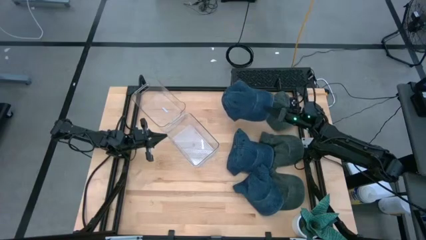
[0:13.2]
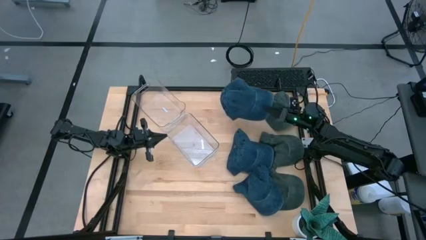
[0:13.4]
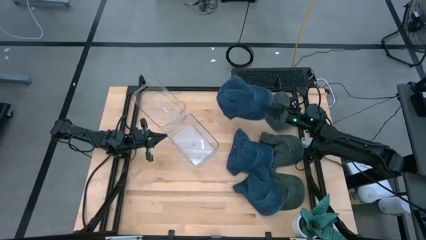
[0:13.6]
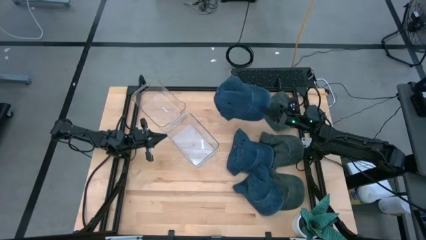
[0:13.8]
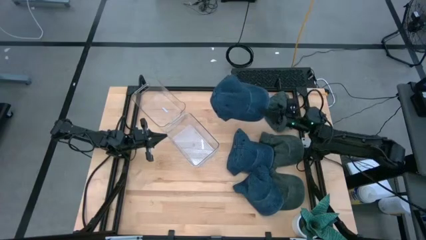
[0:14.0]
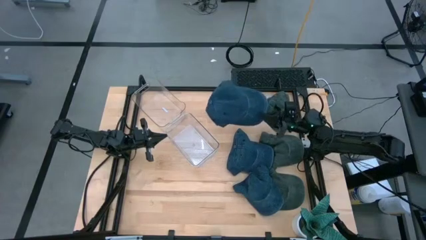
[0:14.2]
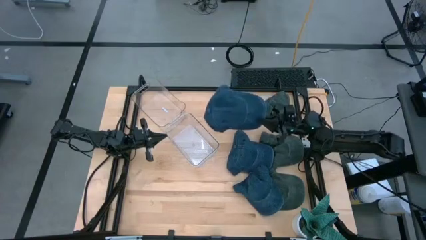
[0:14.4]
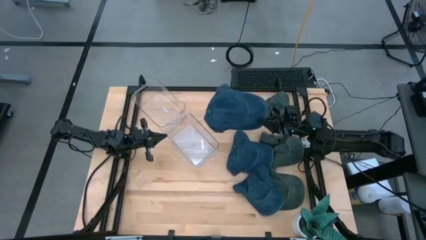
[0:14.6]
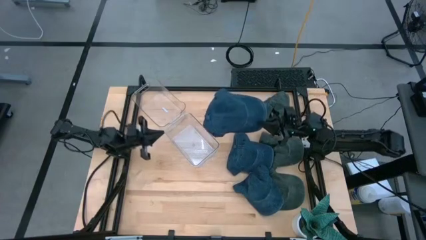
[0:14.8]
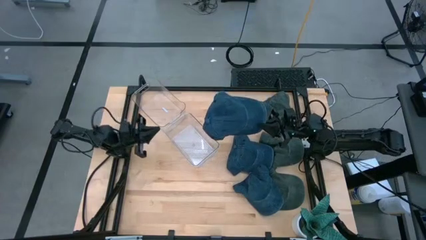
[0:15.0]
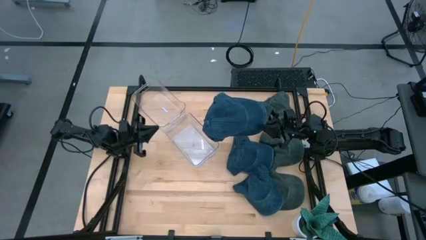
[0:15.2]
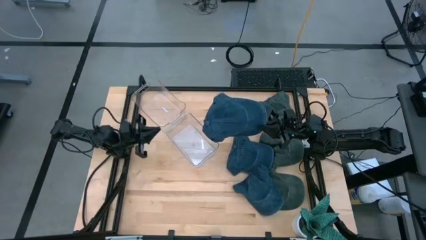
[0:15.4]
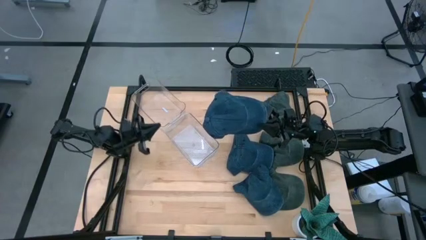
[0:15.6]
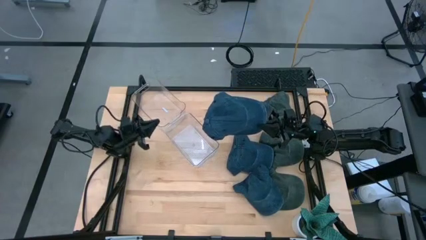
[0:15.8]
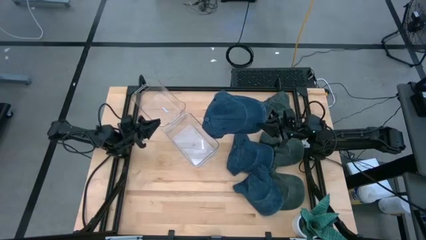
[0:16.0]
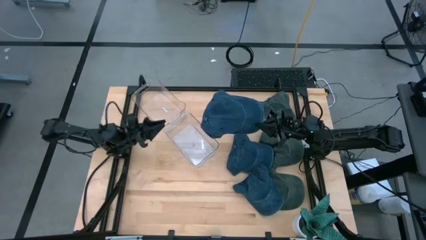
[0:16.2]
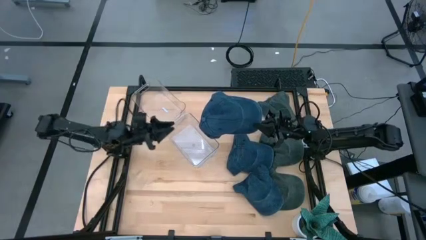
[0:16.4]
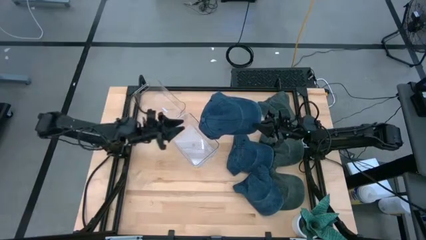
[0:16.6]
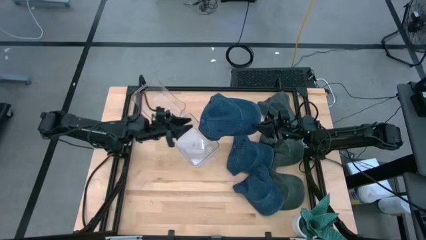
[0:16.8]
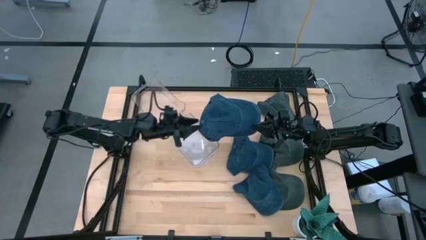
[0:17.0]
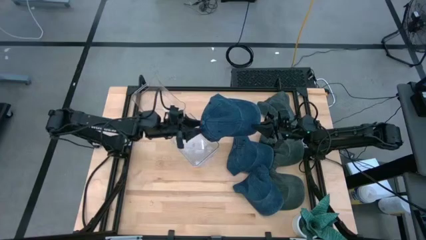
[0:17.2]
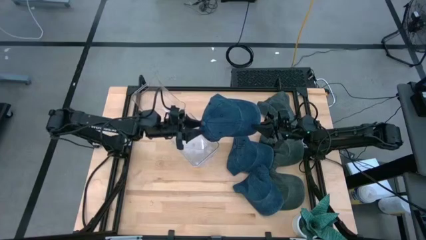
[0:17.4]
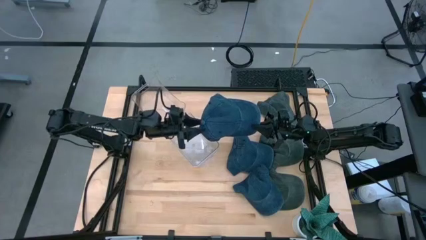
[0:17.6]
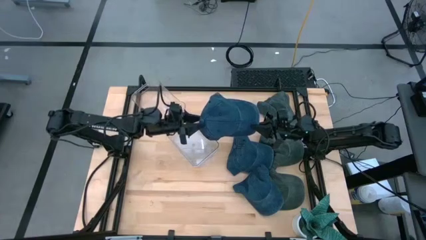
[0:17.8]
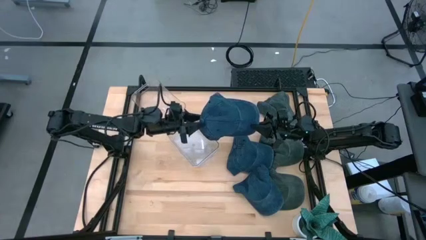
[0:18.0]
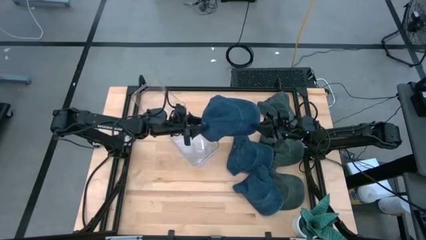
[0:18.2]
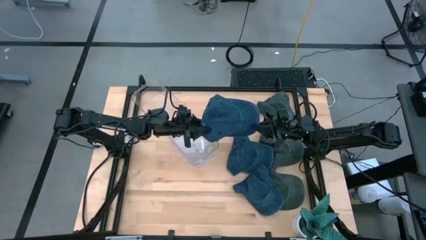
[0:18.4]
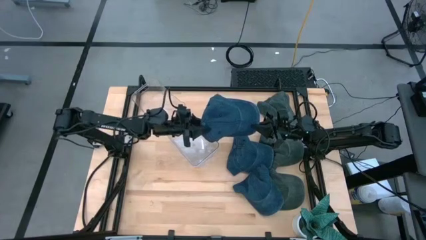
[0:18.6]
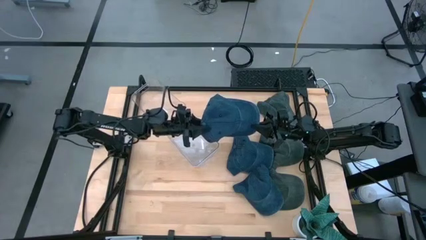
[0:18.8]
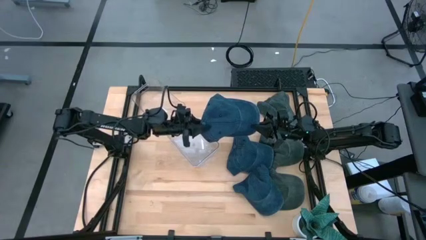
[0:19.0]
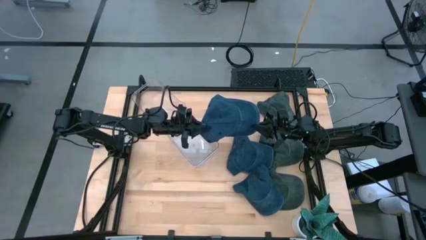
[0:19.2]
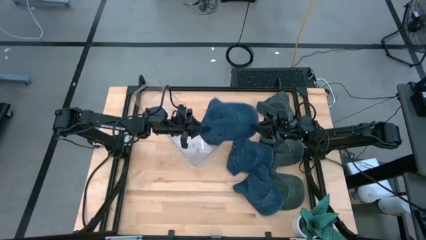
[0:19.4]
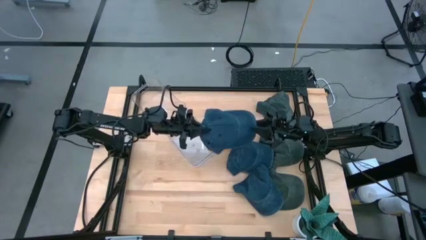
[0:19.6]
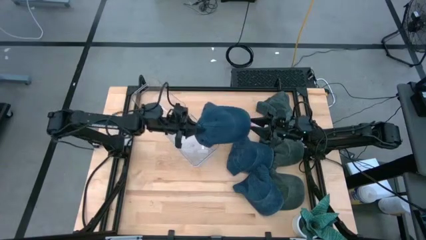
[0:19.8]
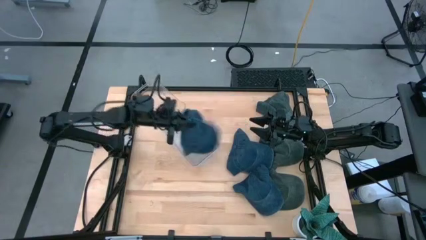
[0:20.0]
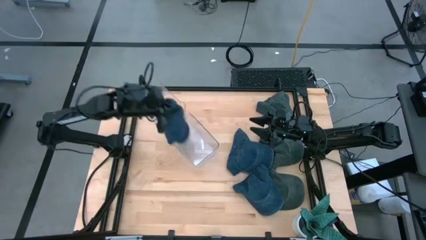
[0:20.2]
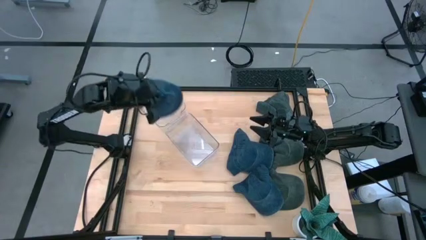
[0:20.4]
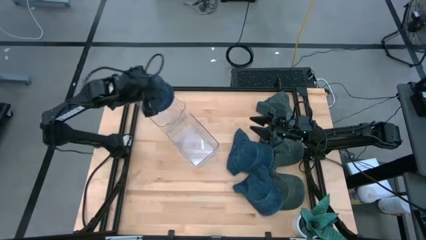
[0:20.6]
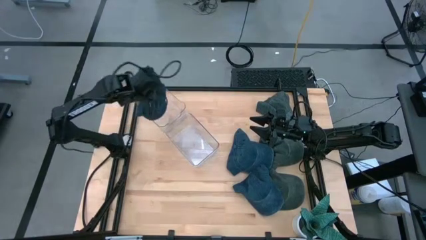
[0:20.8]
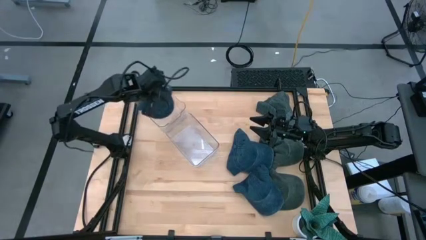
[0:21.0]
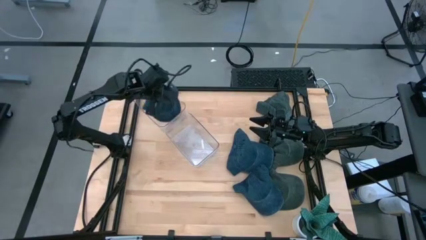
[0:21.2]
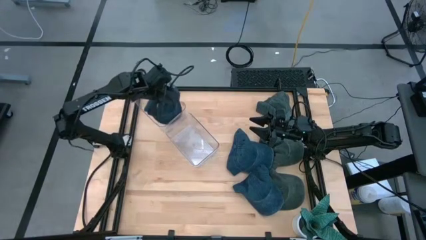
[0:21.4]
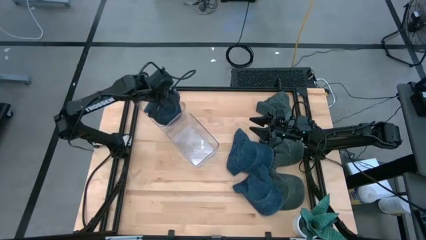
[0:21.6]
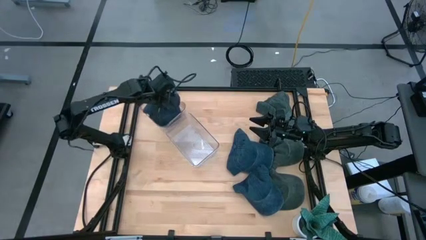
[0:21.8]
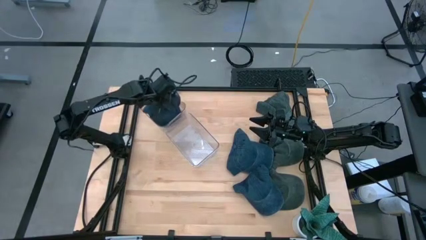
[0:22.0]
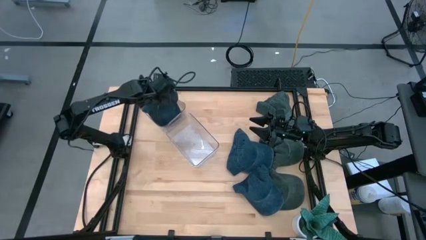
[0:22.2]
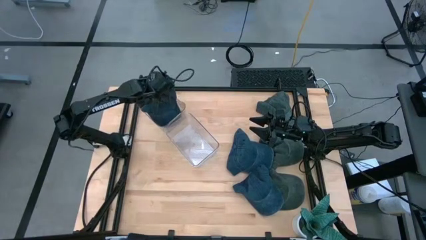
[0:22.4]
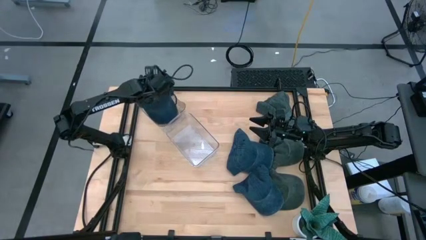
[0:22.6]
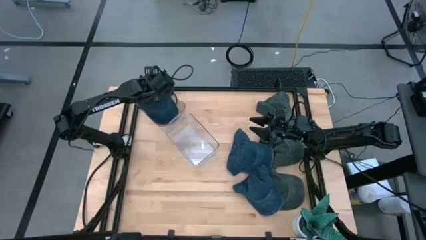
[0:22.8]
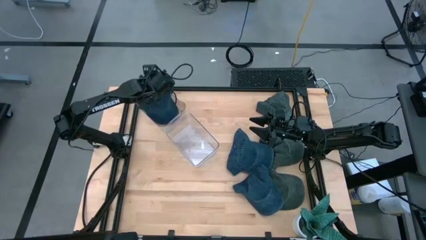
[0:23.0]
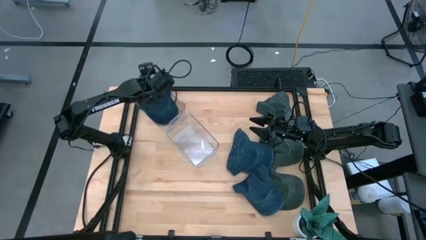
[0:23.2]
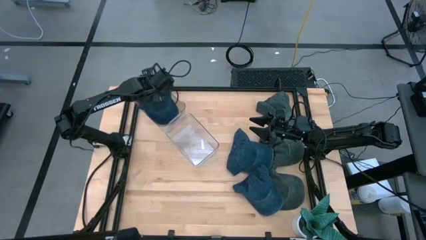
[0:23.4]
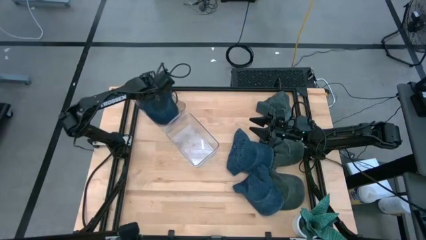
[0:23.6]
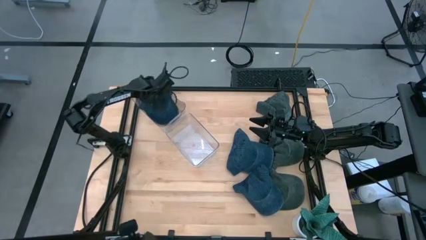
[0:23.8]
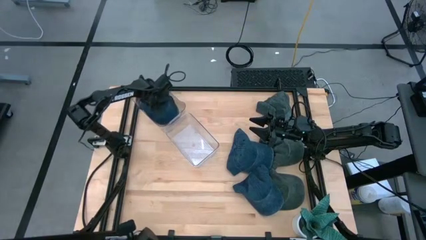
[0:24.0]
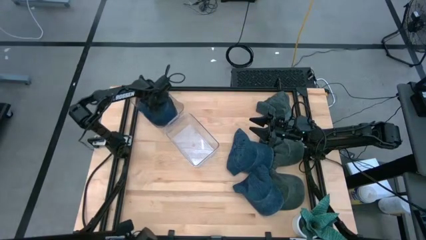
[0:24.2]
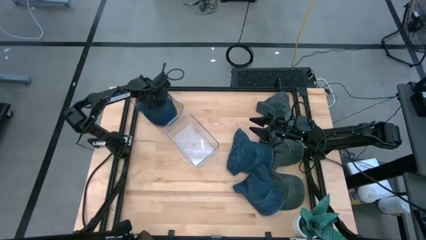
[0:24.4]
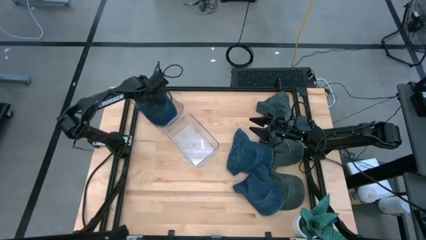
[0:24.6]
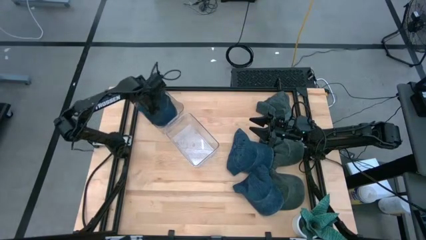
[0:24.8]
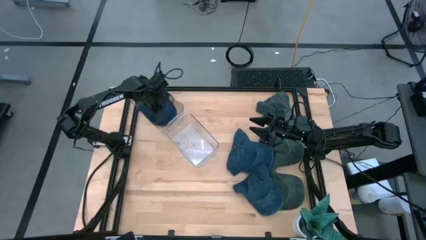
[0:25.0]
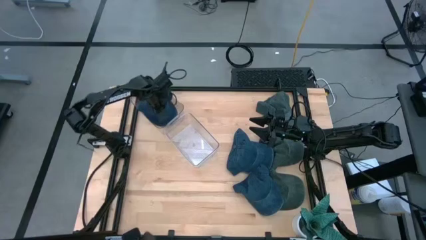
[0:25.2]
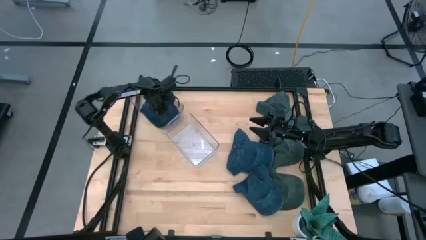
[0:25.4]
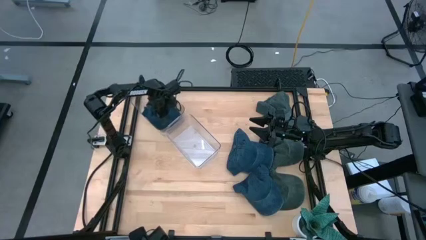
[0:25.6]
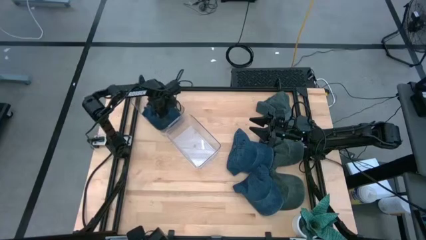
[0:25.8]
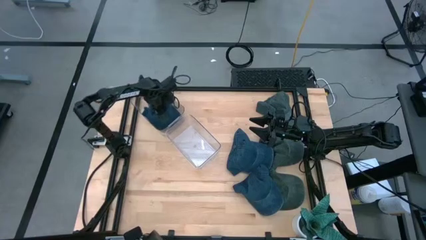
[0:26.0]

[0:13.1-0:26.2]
Task: Pick & Place hat
Put the top blue cap into the top transparent bin
